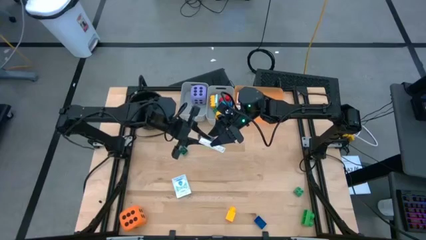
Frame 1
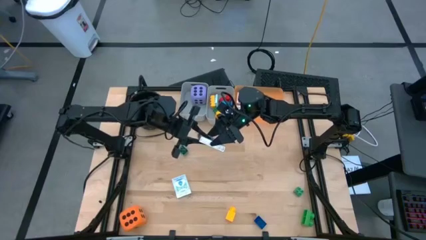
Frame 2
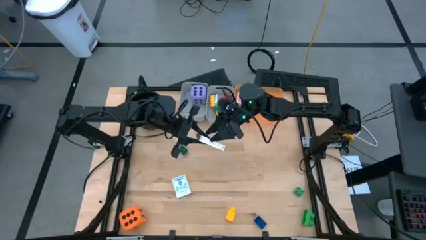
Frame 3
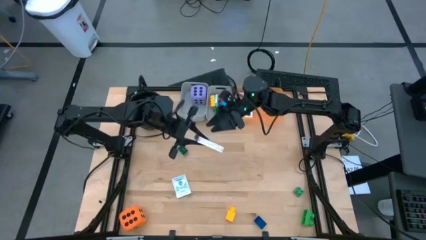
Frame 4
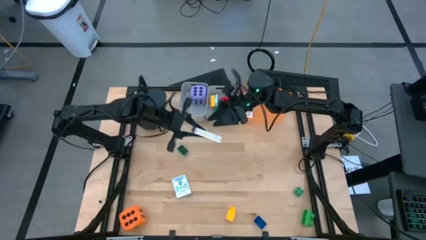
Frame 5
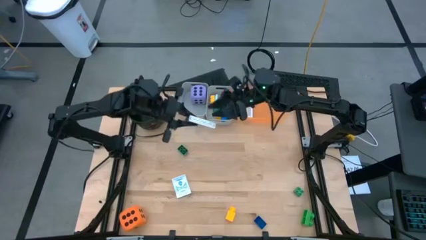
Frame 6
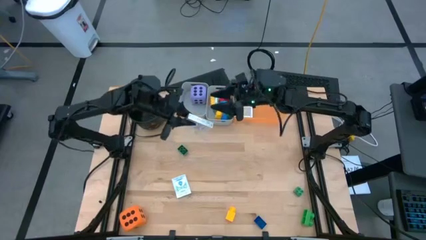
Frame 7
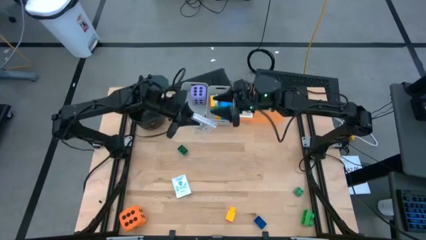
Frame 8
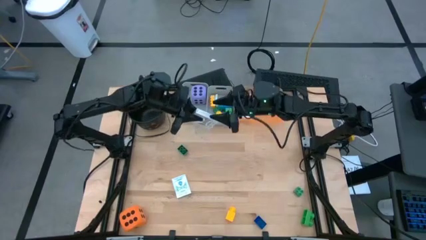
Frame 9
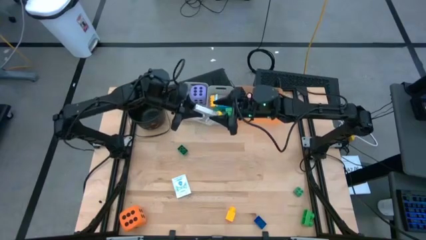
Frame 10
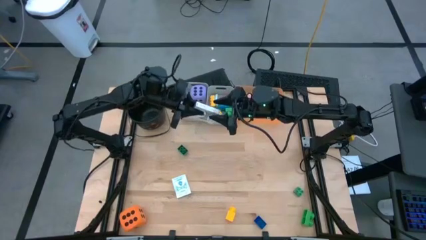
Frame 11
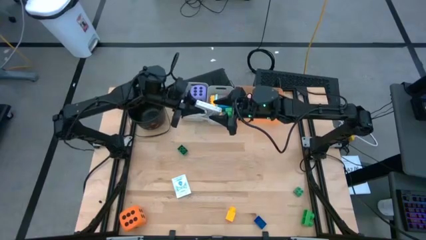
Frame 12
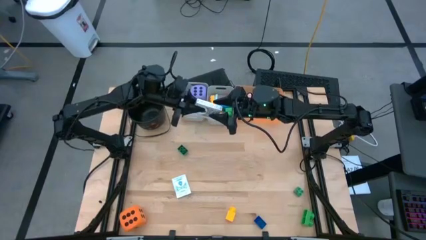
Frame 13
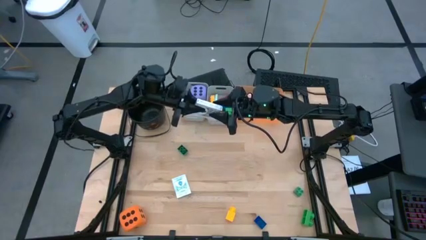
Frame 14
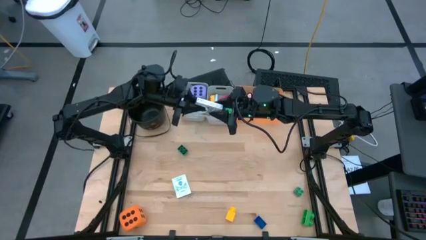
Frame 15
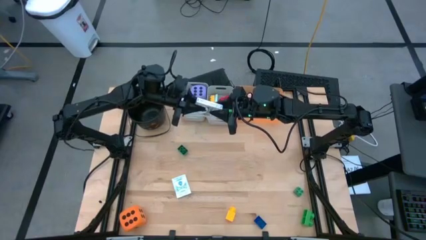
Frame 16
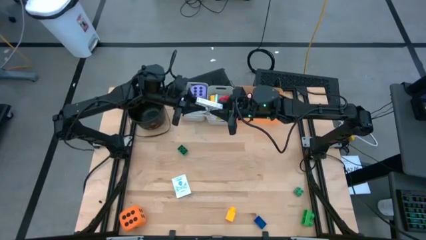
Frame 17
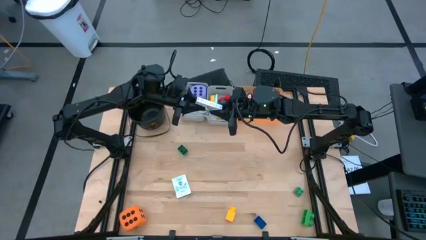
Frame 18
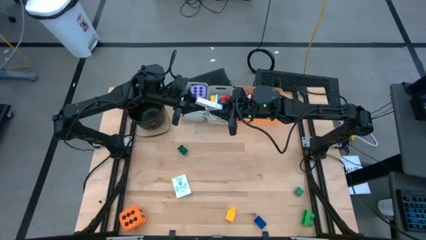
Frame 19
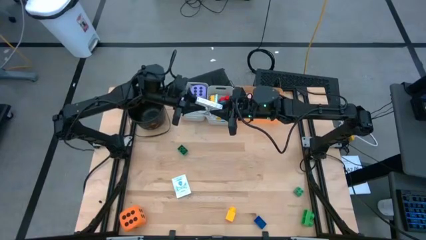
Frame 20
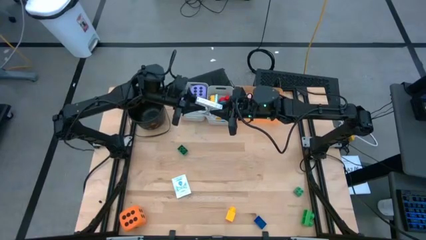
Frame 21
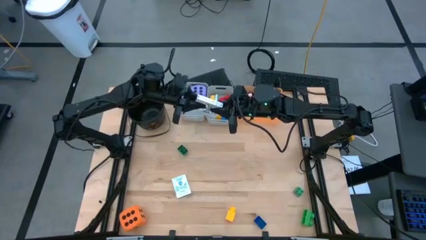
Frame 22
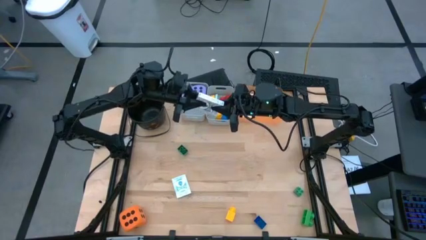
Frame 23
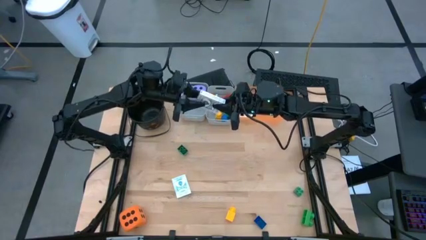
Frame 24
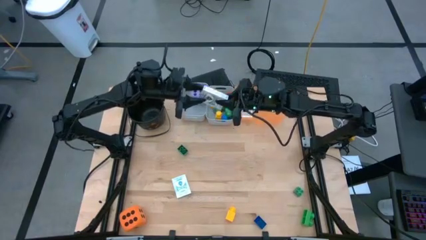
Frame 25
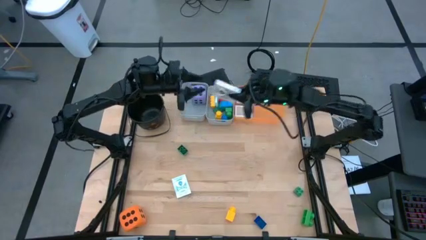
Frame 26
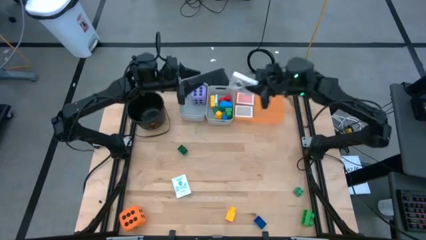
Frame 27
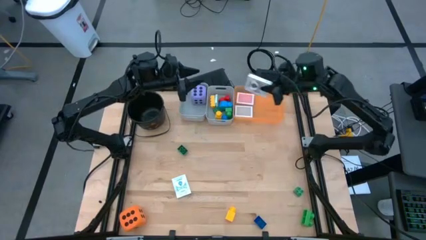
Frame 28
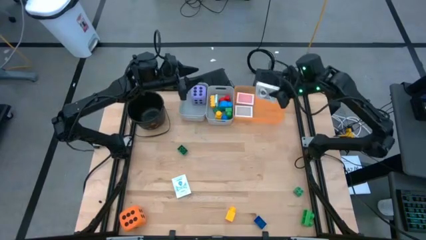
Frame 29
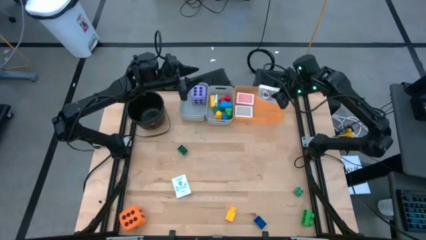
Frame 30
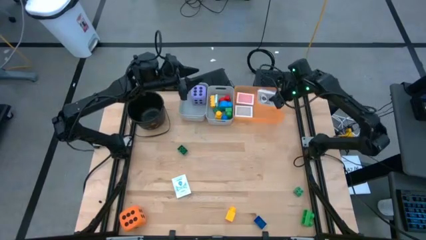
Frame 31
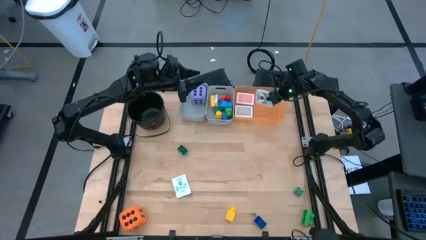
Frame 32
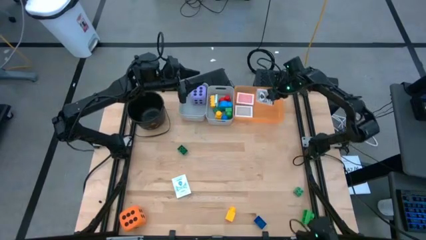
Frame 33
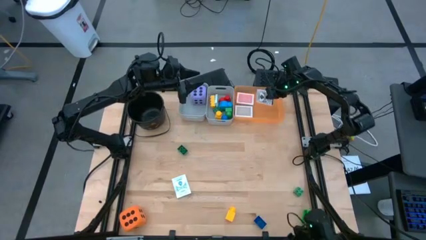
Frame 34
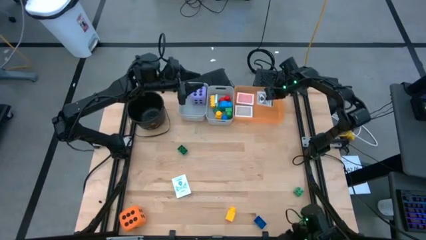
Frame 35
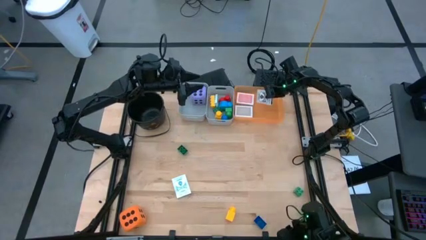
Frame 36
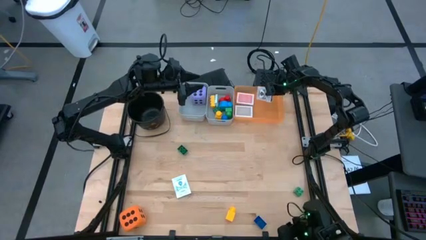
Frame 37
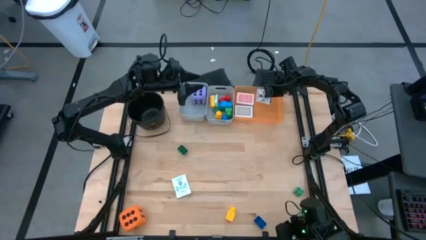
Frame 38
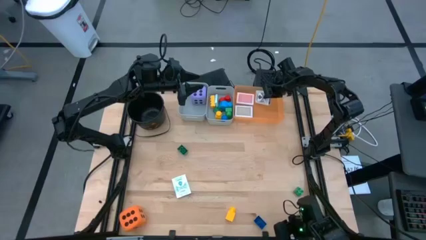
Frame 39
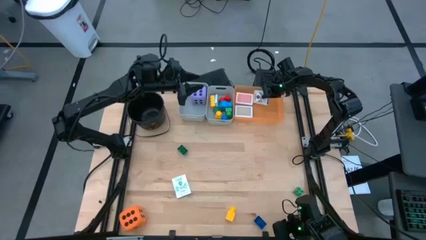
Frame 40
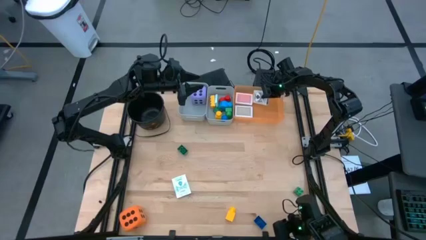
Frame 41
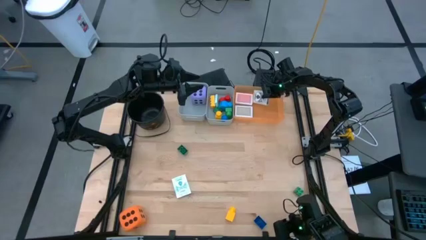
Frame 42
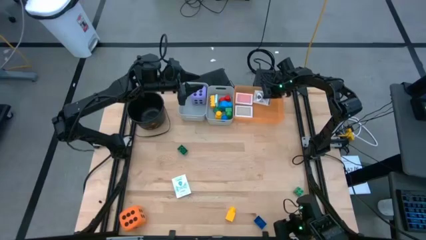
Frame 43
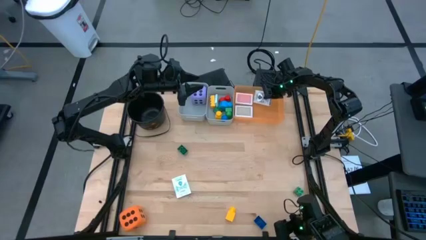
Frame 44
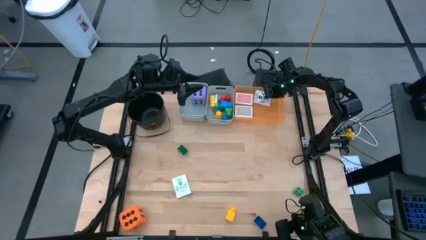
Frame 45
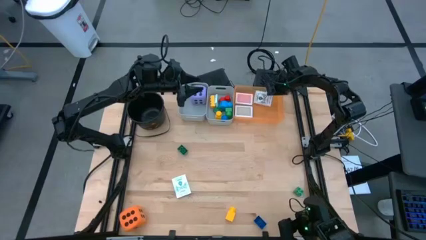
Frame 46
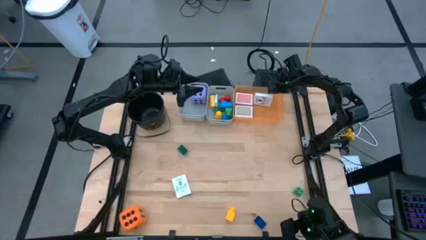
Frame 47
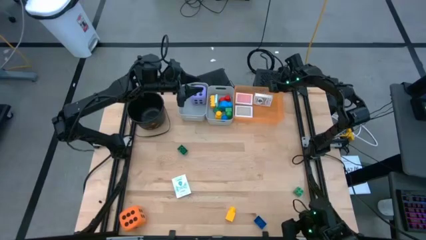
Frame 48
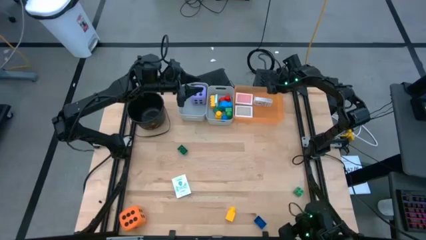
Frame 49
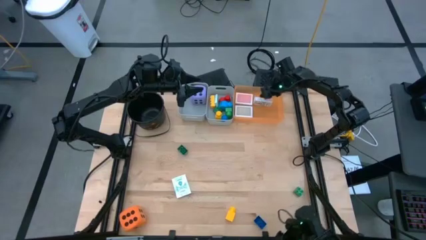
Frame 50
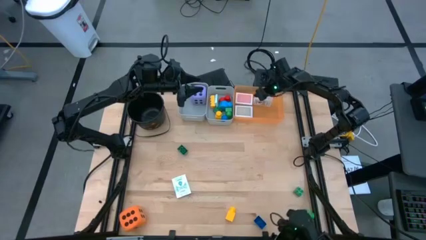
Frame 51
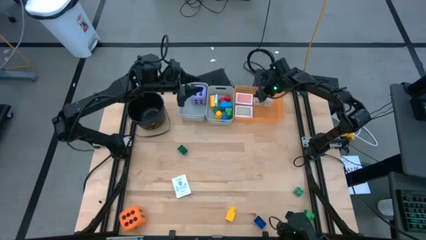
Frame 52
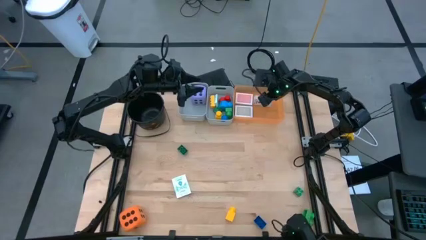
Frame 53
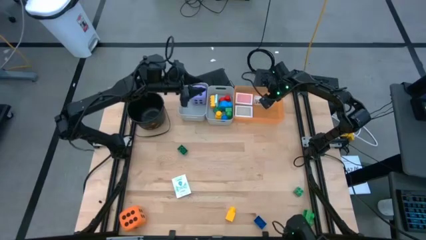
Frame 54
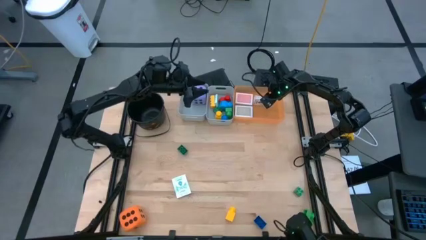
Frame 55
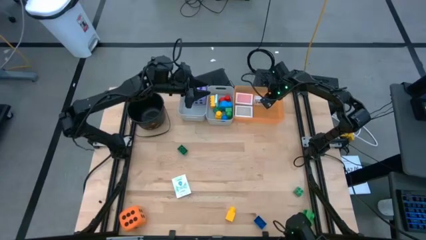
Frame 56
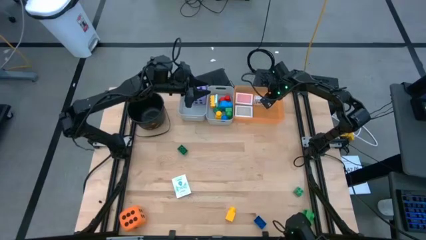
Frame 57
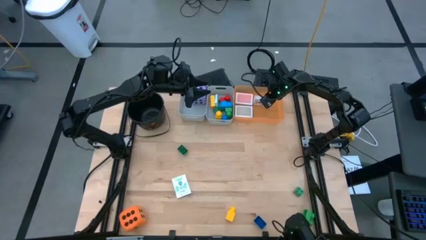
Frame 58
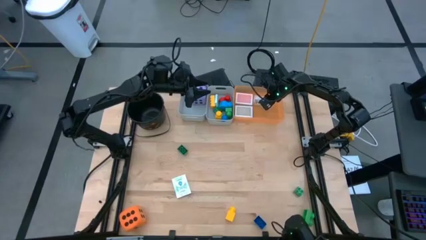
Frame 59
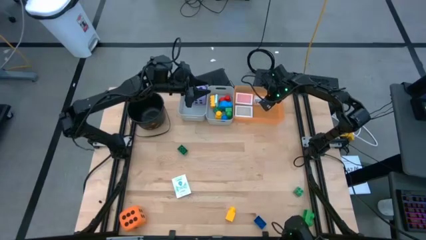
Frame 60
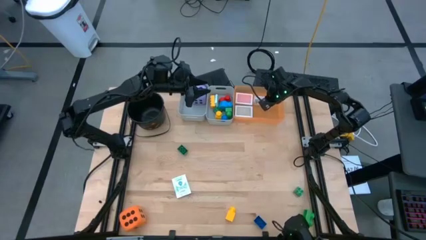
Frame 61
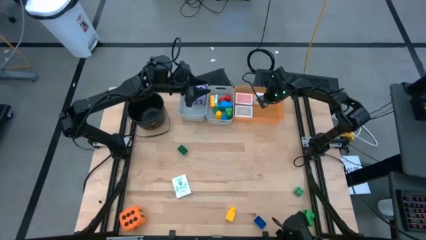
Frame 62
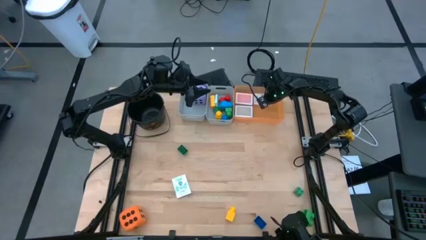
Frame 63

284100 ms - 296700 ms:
Task: Pick & Place Toys
Put the black playing card into the orange bin
